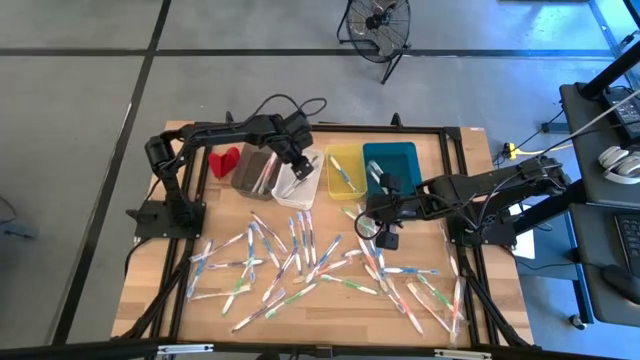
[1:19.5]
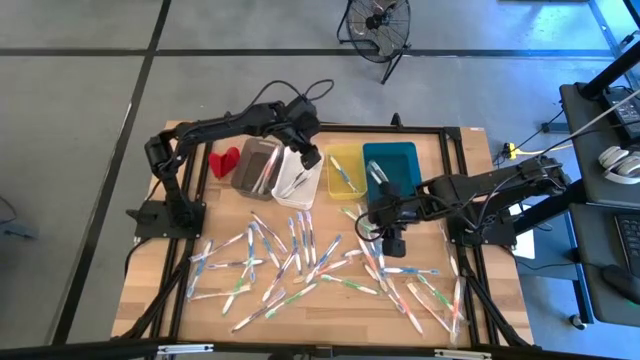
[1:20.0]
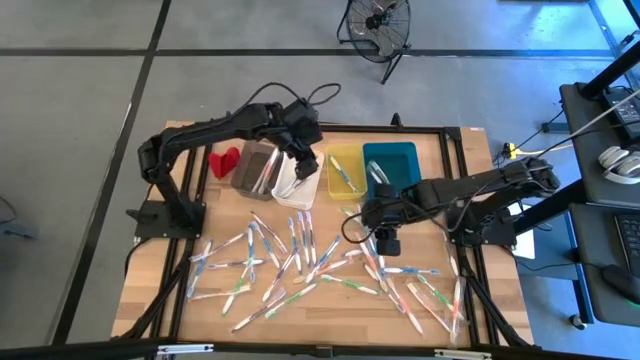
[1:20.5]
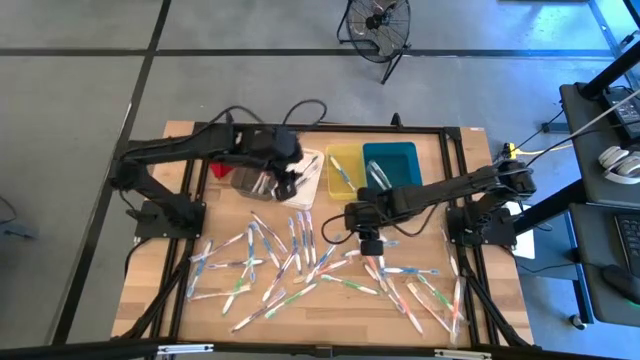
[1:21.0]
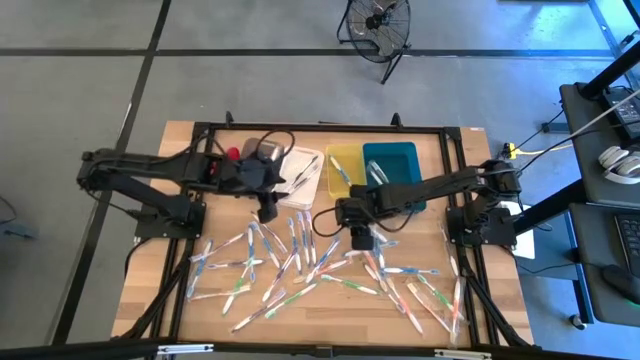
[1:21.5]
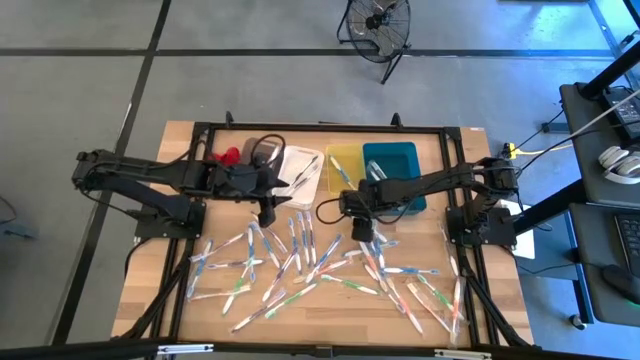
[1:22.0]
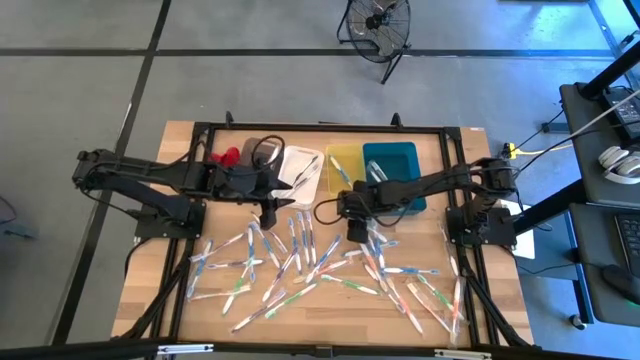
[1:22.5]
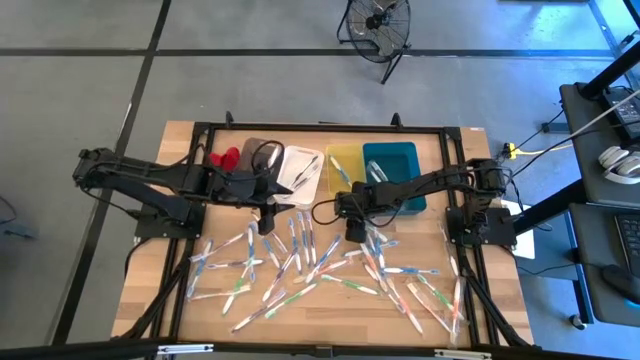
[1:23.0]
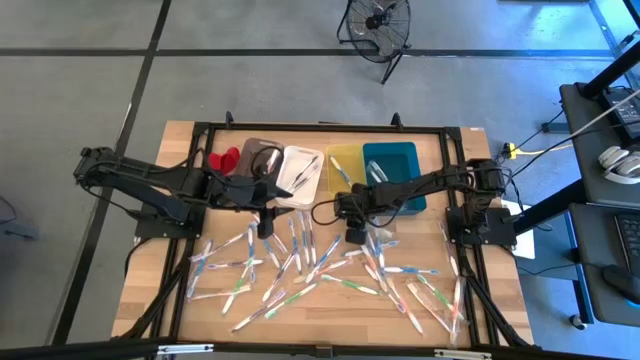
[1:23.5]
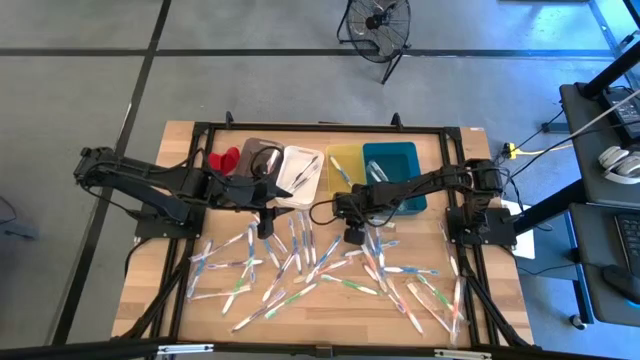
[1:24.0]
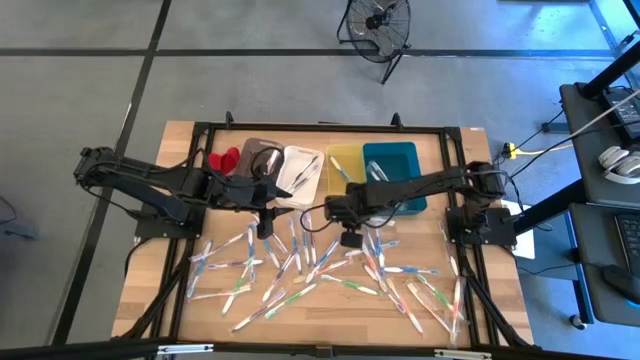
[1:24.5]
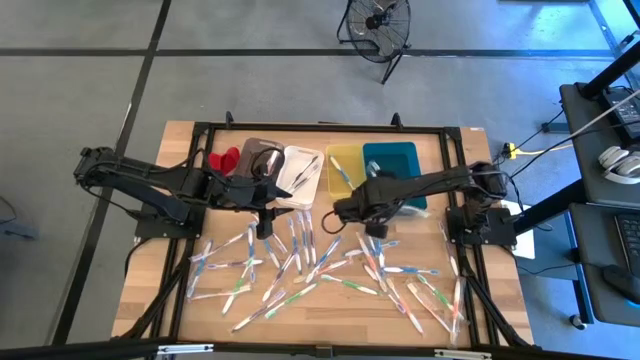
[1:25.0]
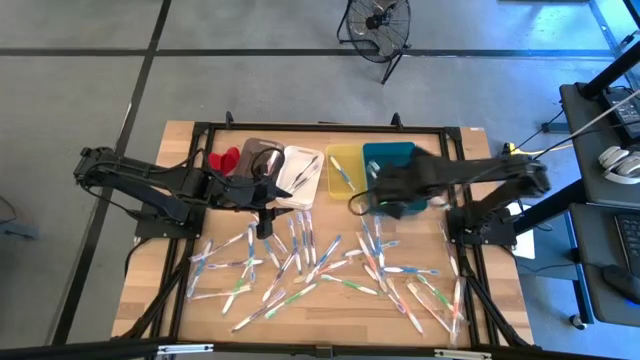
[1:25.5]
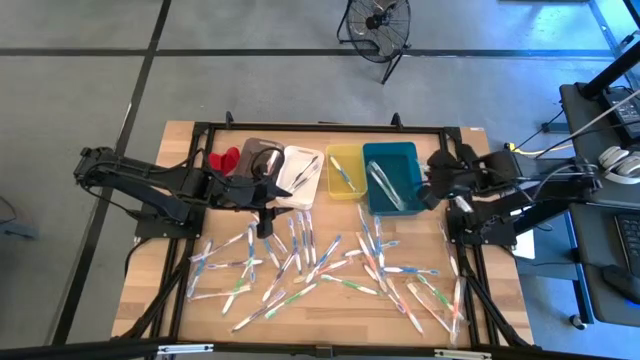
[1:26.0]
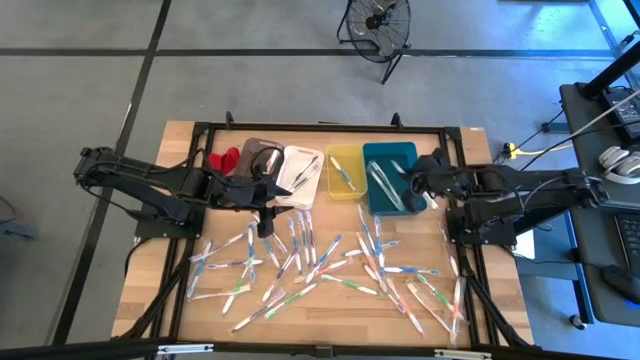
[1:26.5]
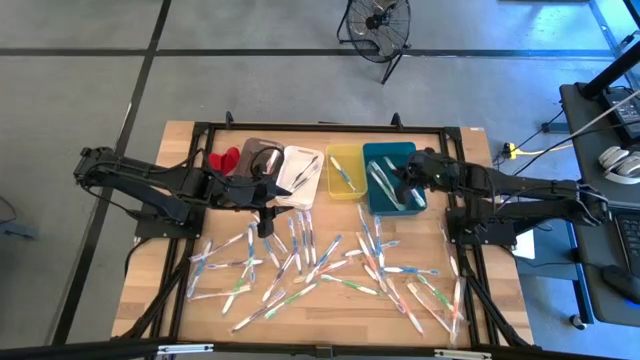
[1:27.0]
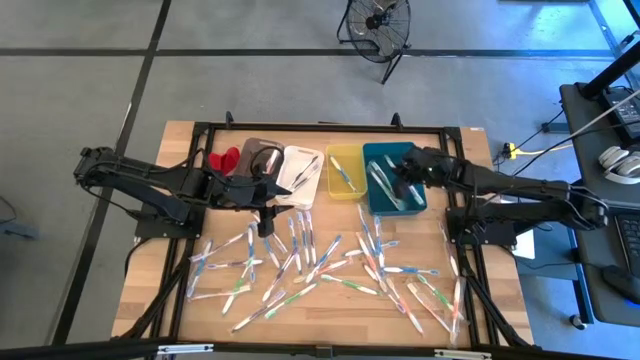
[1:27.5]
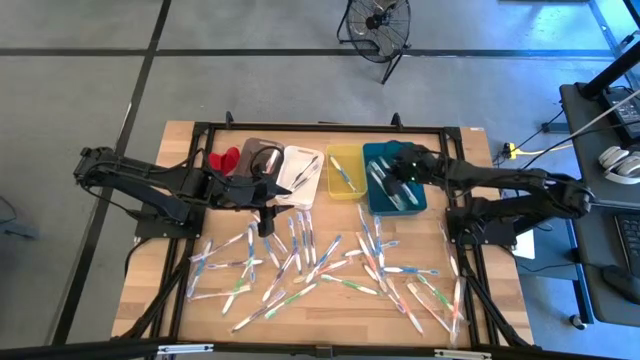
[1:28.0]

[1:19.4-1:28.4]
Task: Pick & Place Toothbrushes
Put the green toothbrush into the blue bin

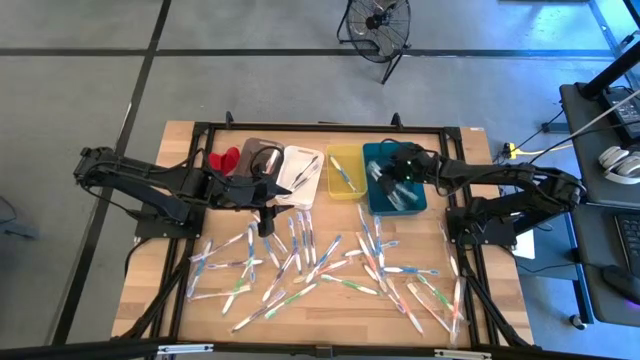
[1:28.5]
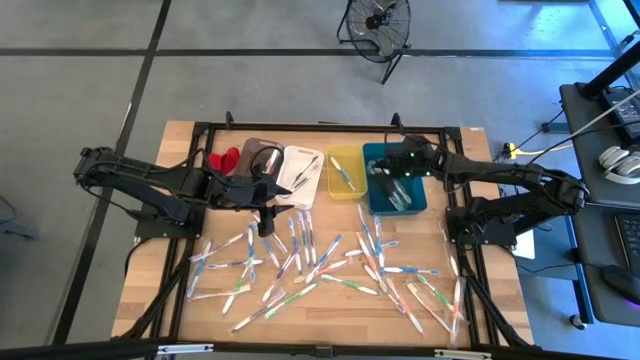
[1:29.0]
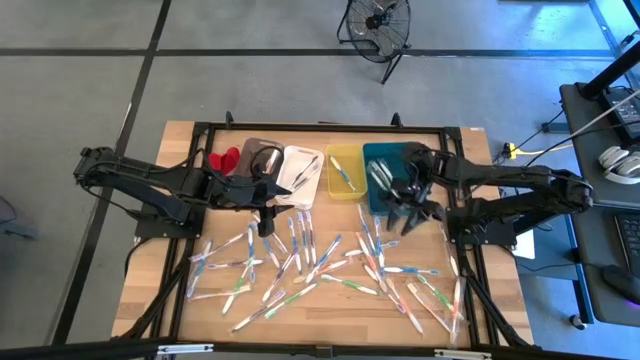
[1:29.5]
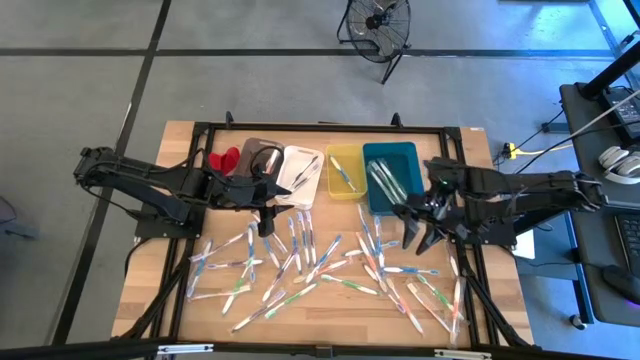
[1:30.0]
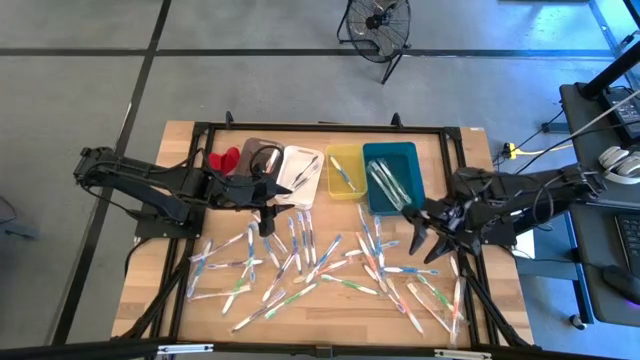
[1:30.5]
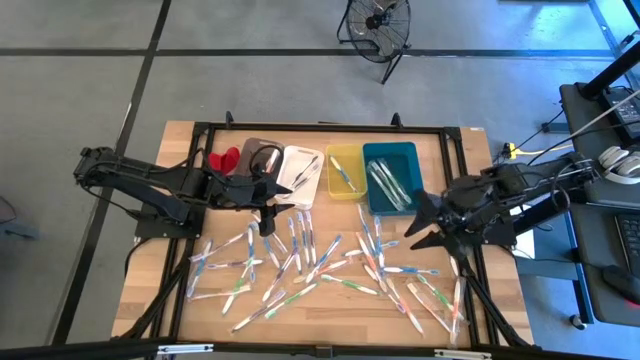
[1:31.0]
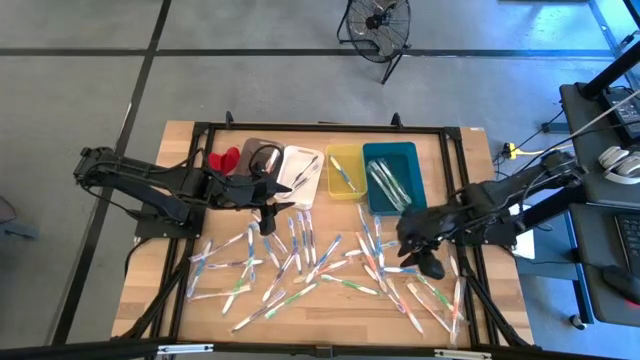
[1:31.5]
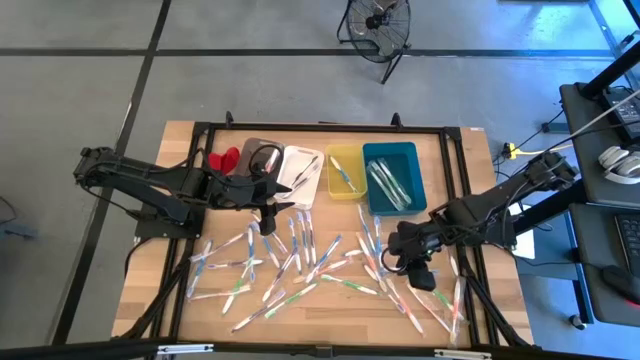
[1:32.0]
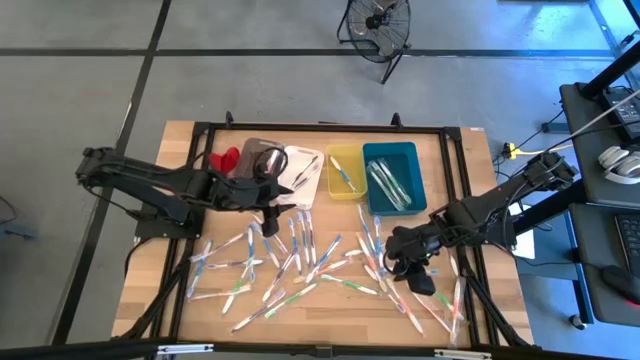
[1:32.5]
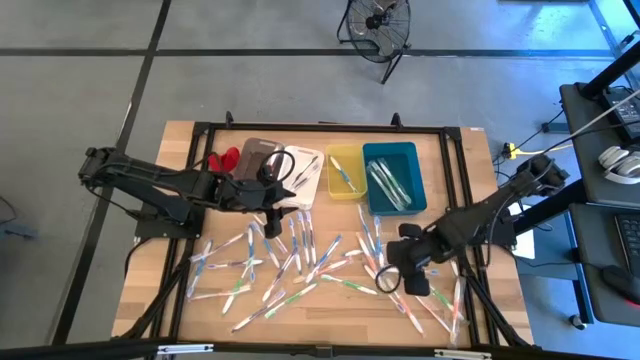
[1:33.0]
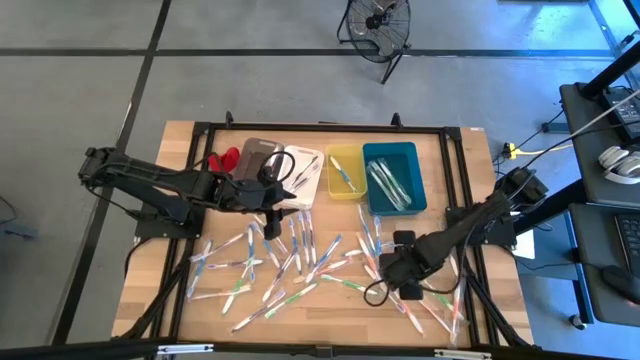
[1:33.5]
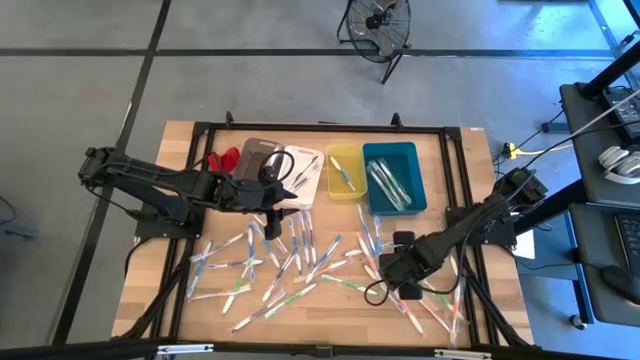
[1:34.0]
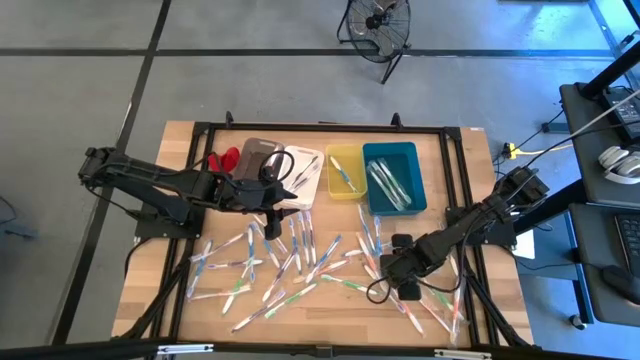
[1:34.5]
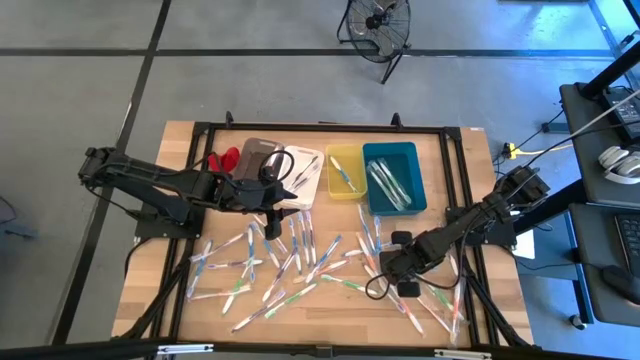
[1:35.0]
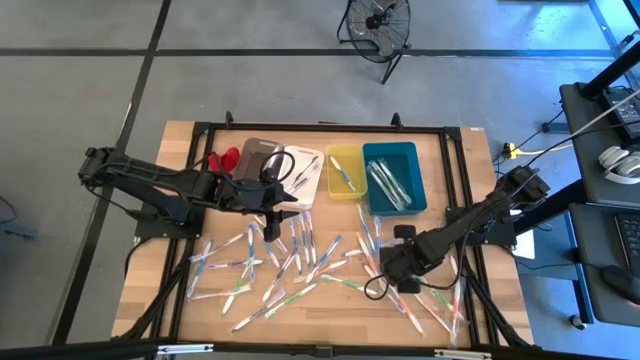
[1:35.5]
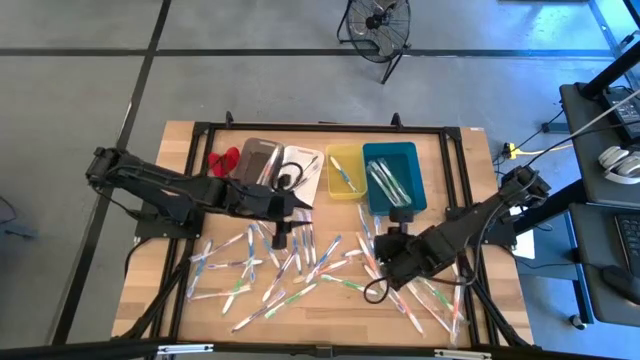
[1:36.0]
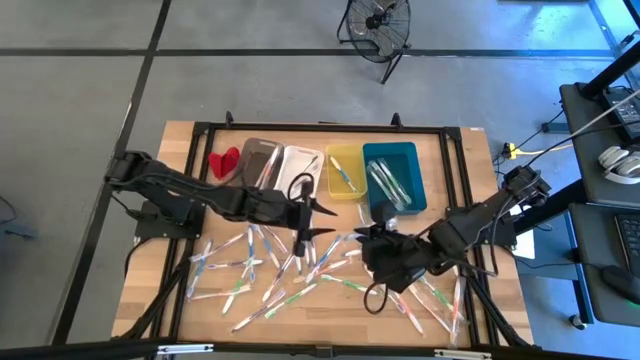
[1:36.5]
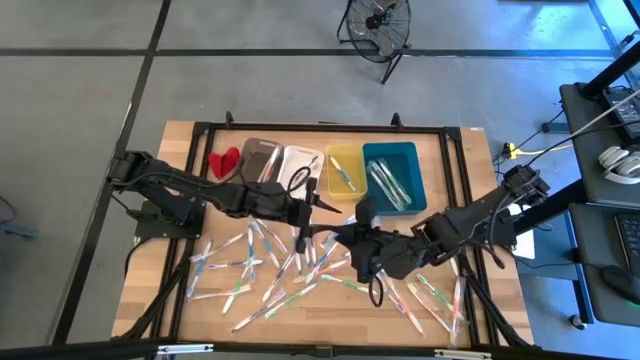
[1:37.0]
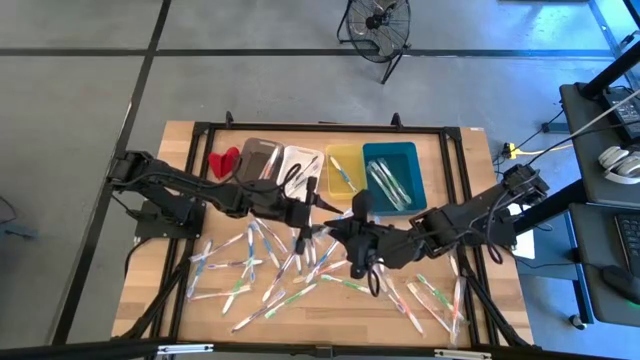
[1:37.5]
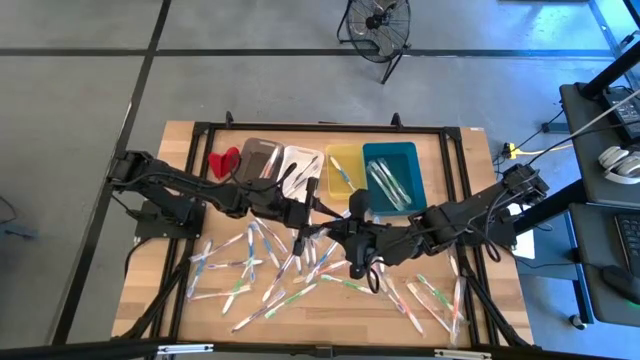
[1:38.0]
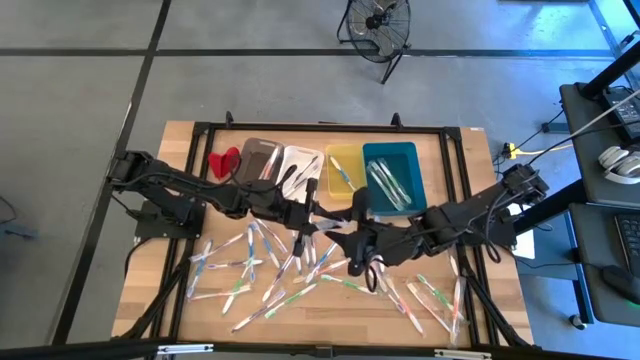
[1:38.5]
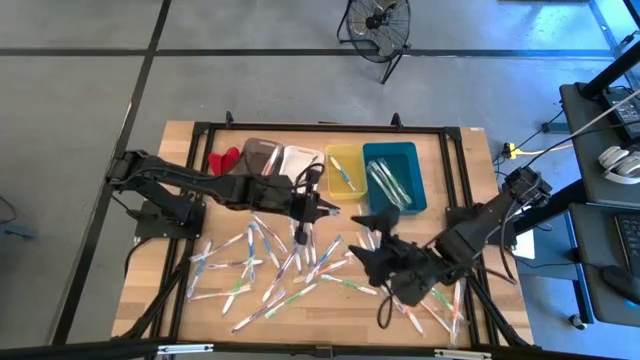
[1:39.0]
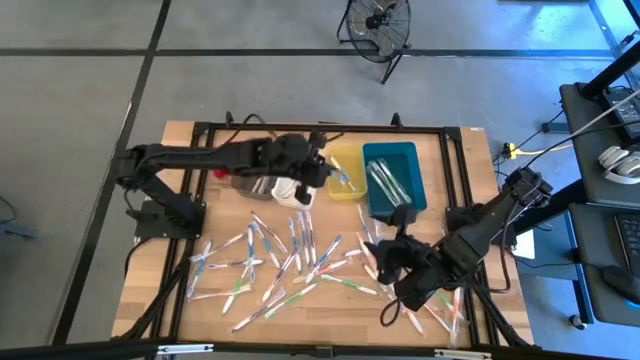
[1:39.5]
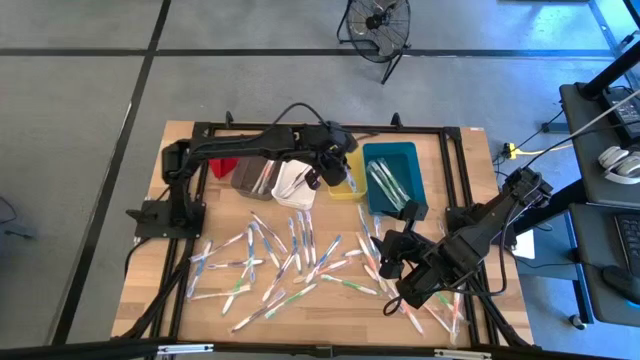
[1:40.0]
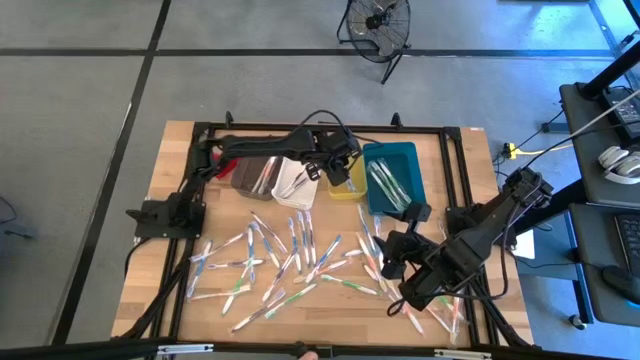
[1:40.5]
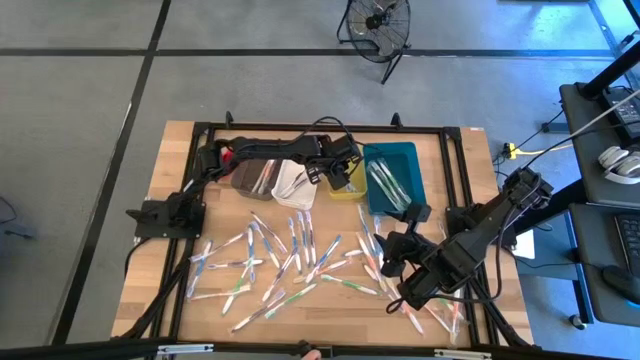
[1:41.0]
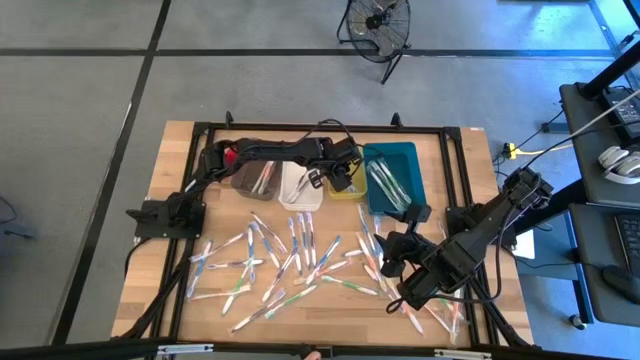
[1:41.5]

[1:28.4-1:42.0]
Put the blue toothbrush into the yellow bin
